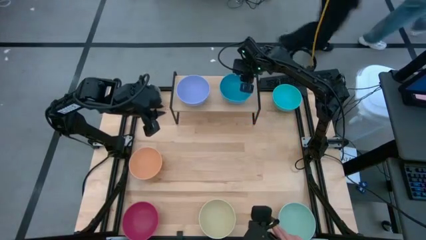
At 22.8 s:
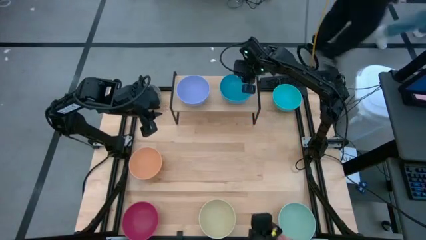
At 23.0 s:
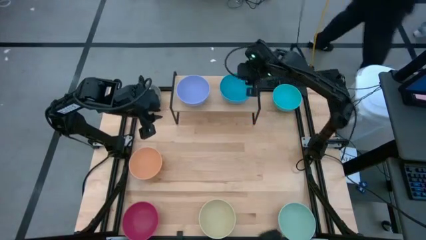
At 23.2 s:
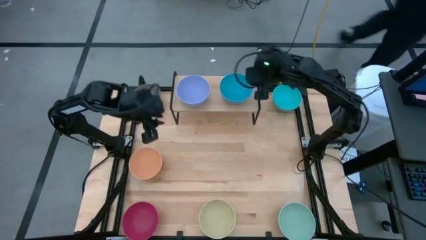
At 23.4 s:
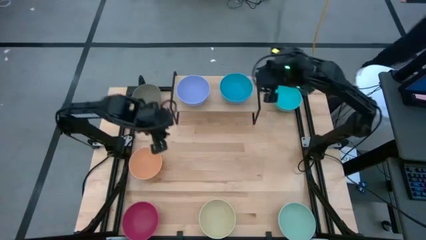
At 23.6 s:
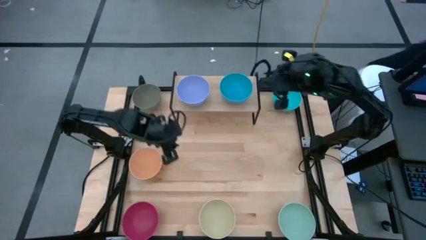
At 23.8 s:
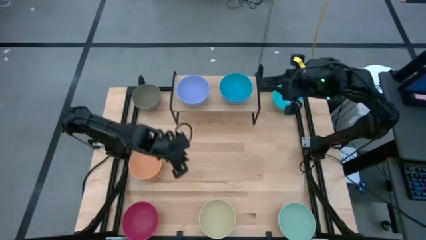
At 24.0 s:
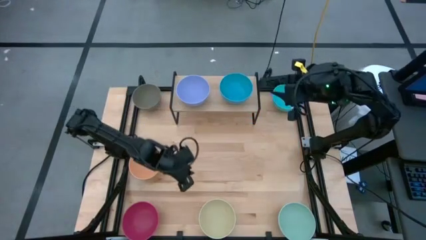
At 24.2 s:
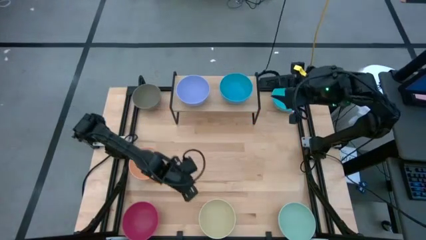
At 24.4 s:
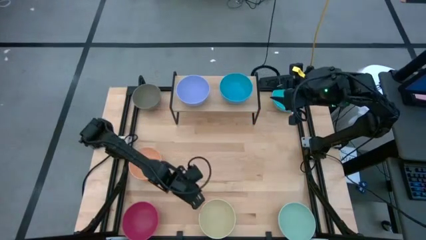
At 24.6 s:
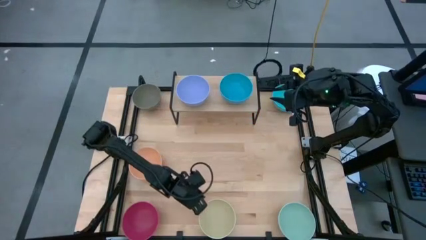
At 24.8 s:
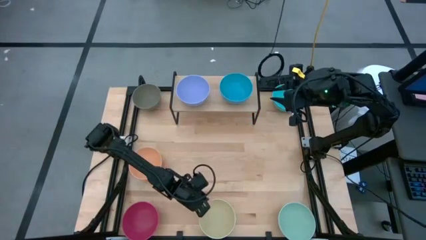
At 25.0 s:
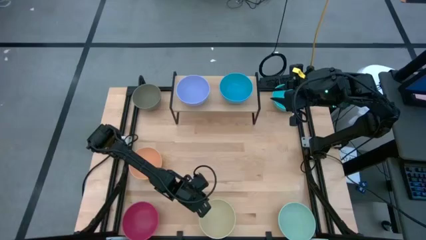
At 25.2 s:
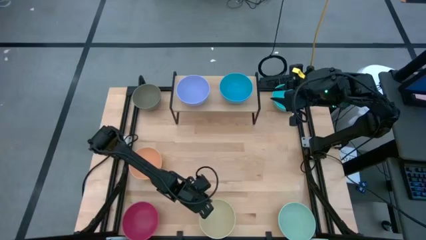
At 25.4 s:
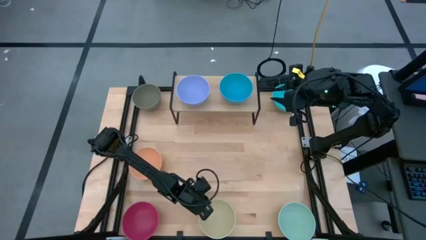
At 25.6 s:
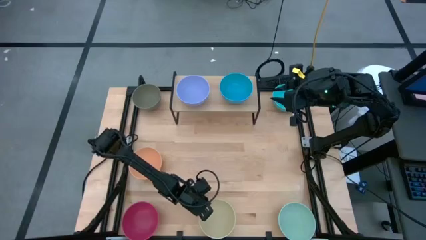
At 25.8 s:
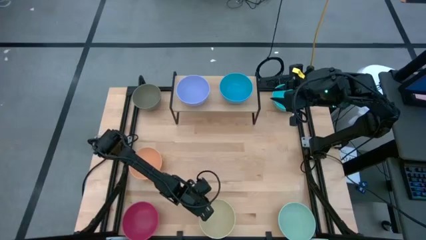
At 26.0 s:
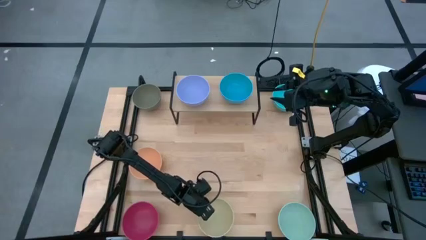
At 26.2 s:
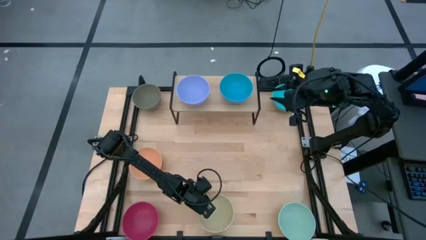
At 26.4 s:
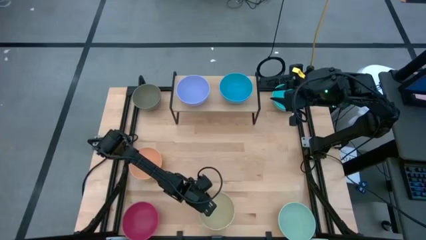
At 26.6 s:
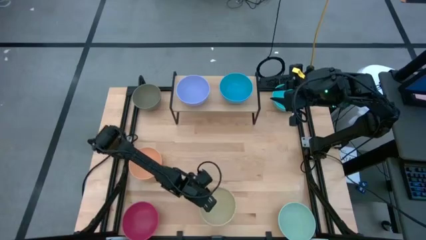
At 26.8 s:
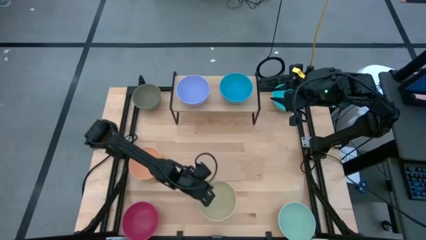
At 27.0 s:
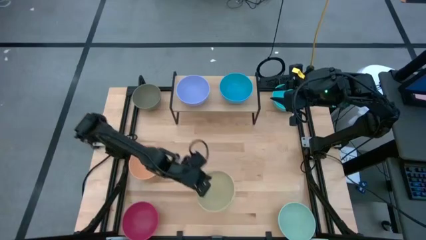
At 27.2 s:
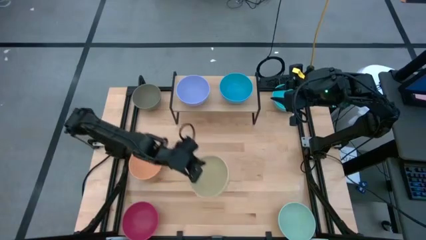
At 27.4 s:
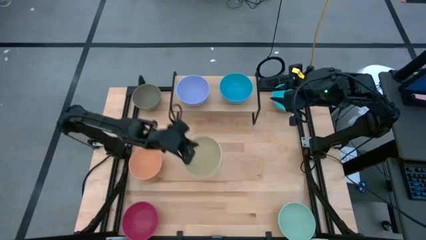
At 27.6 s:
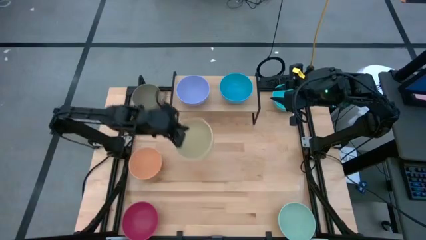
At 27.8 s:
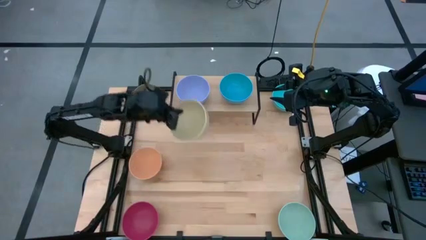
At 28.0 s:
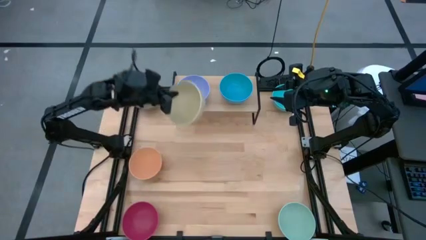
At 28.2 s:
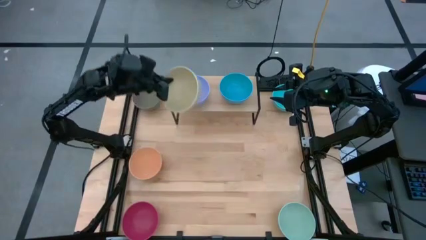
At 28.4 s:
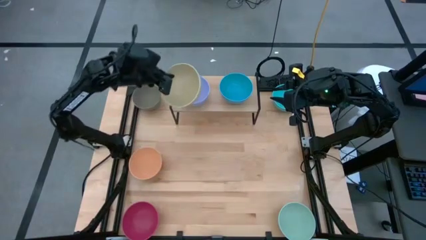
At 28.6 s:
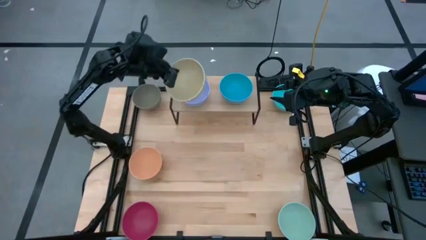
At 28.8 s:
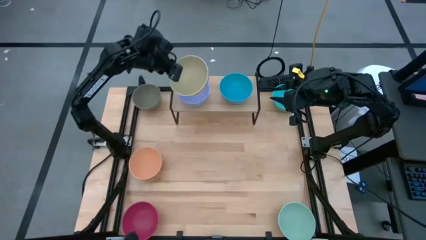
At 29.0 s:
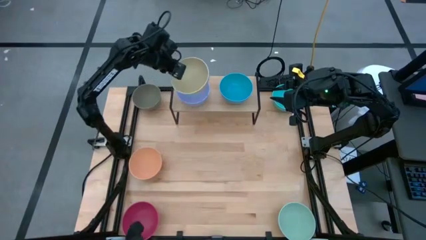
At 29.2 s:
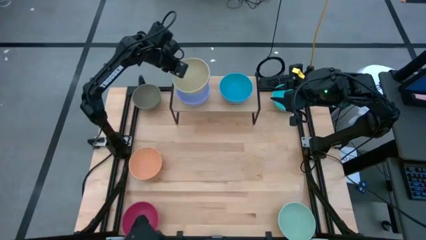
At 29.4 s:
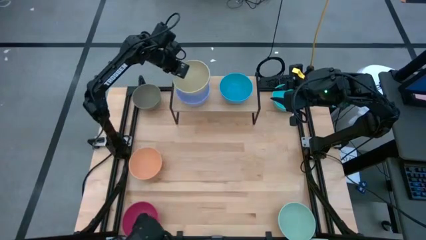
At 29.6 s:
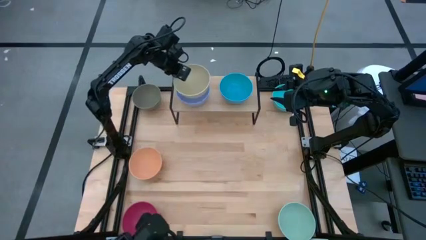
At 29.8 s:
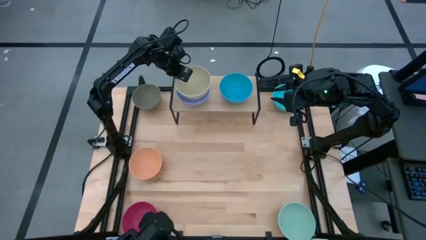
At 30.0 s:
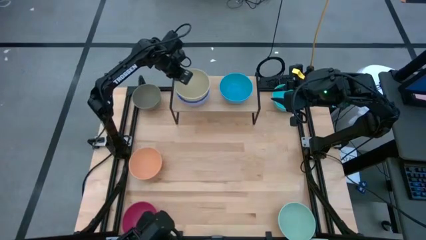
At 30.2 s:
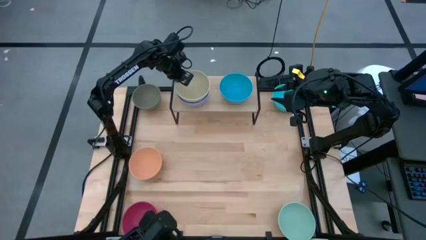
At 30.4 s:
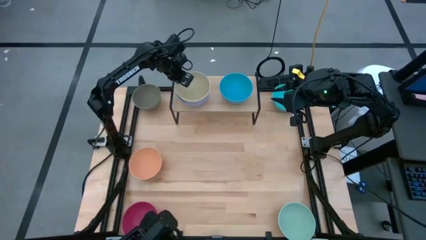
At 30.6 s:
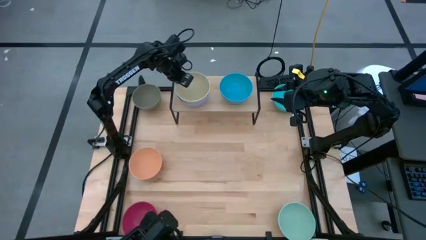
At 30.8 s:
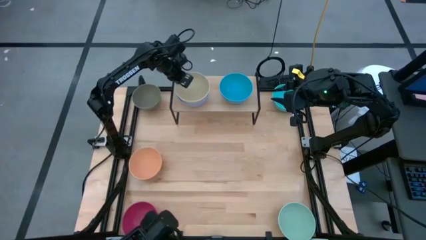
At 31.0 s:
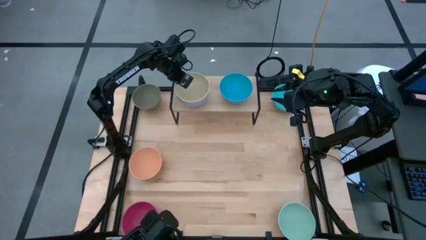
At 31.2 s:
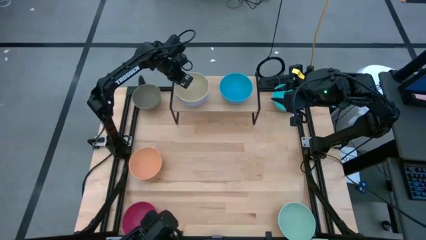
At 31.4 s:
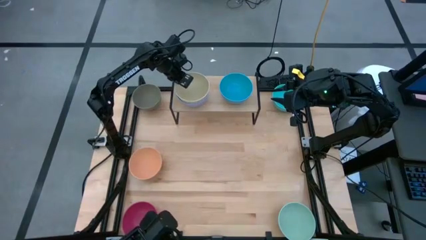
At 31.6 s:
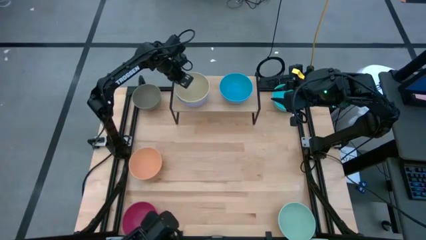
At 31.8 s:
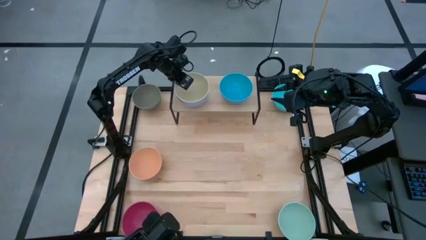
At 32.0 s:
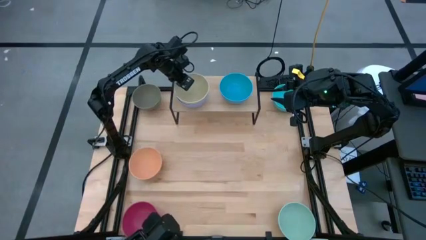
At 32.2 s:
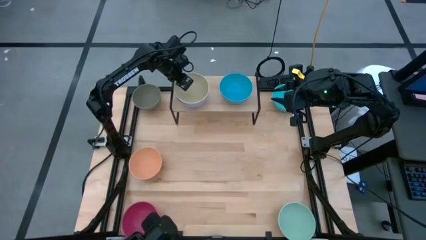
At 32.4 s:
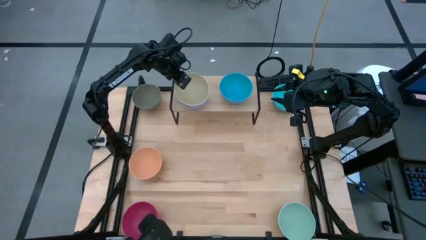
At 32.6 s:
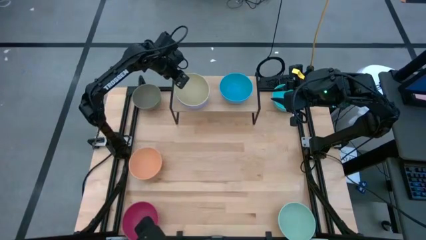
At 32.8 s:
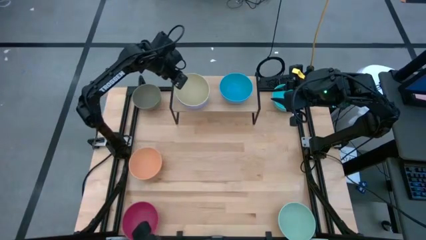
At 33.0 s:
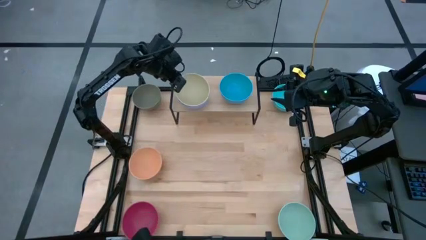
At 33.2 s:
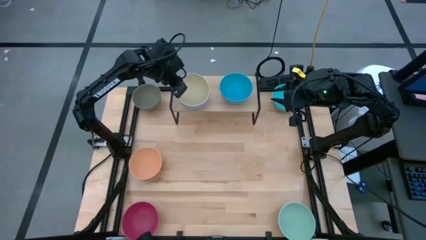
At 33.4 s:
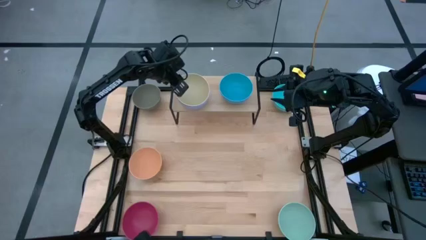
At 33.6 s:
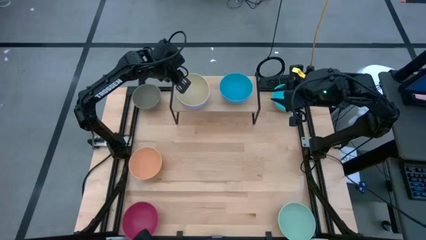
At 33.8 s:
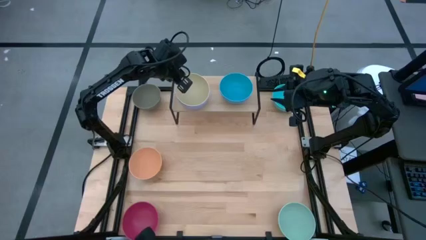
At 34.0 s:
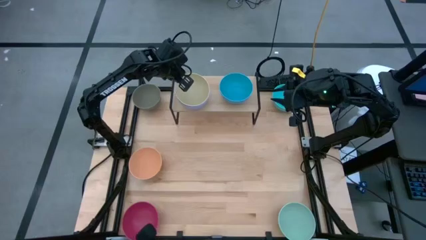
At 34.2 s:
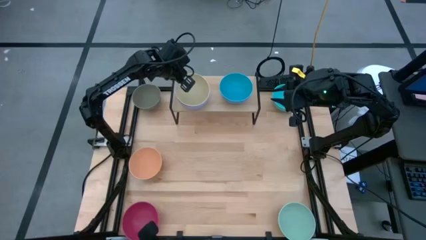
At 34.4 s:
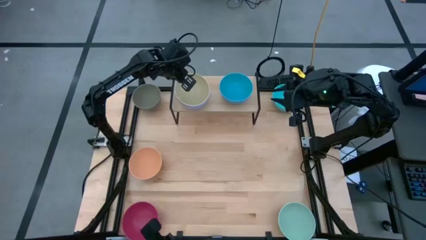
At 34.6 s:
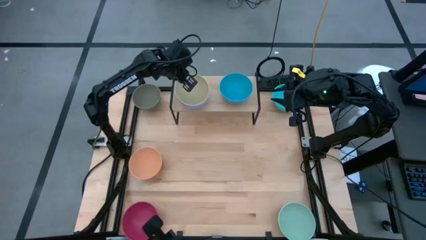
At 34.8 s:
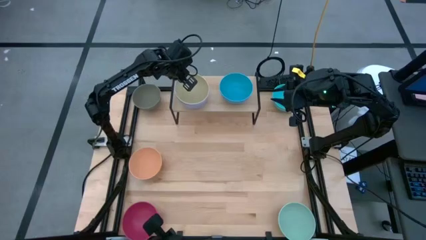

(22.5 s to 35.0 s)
Task: Place and stack bowls onto a shelf
Stack the light brown bowl on top of the purple bowl on the shelf
